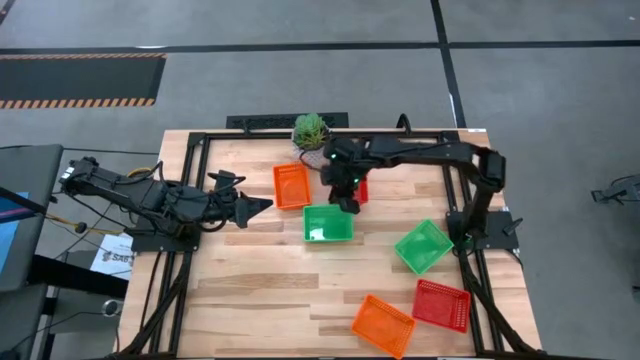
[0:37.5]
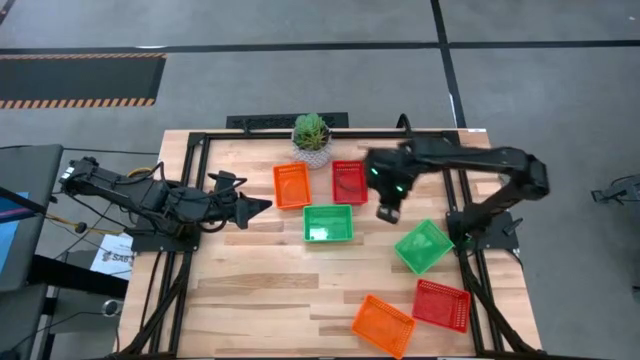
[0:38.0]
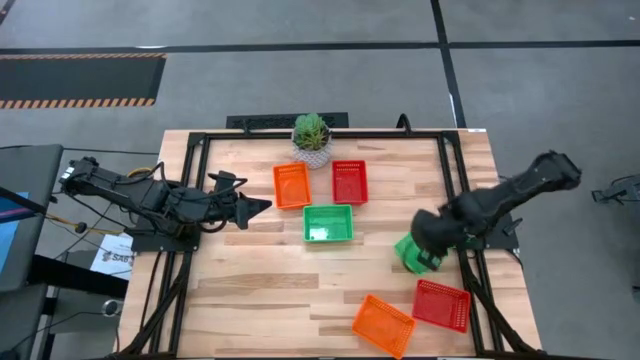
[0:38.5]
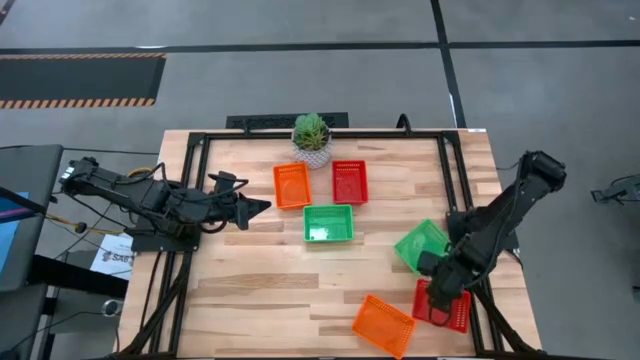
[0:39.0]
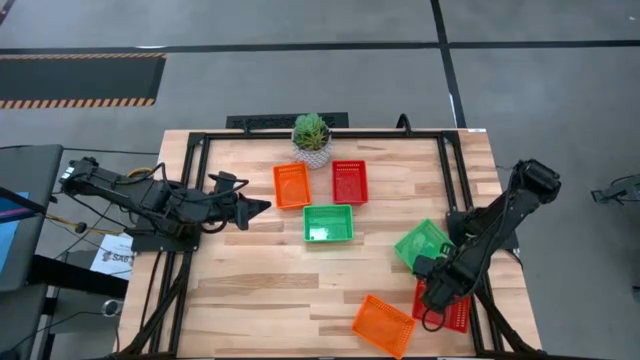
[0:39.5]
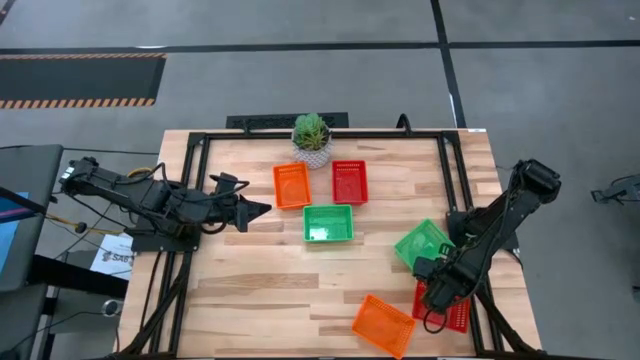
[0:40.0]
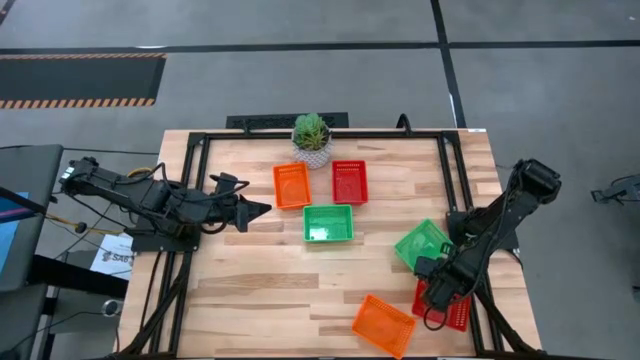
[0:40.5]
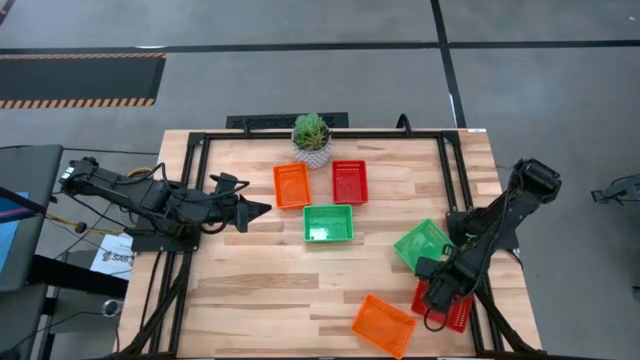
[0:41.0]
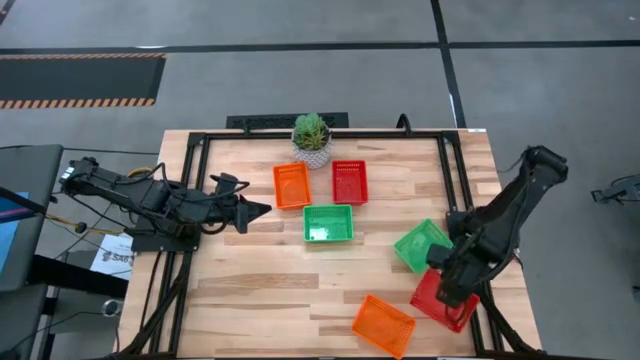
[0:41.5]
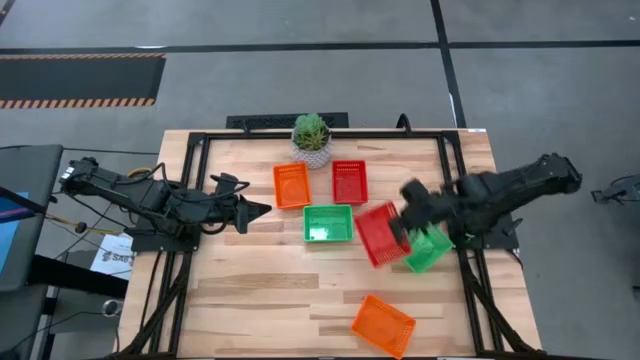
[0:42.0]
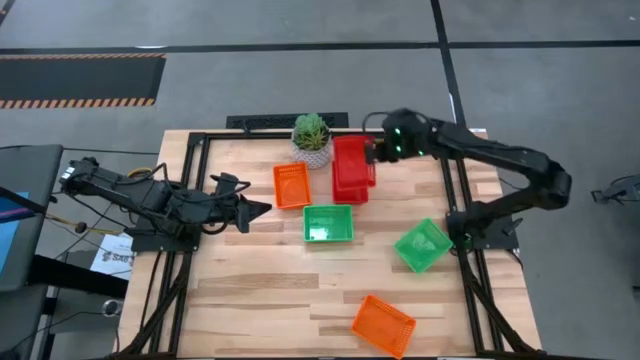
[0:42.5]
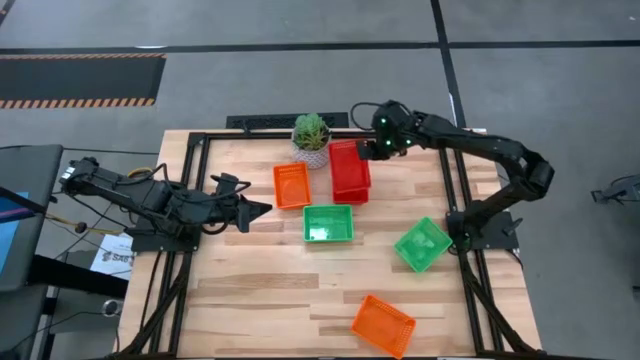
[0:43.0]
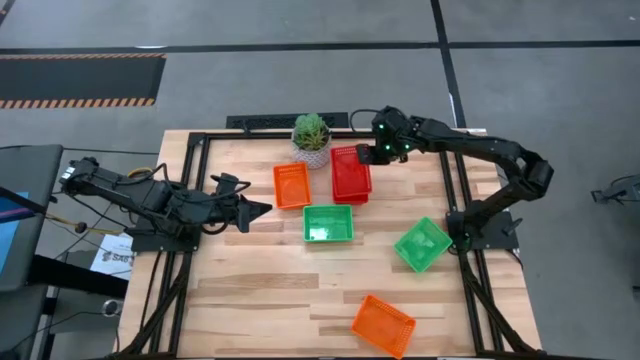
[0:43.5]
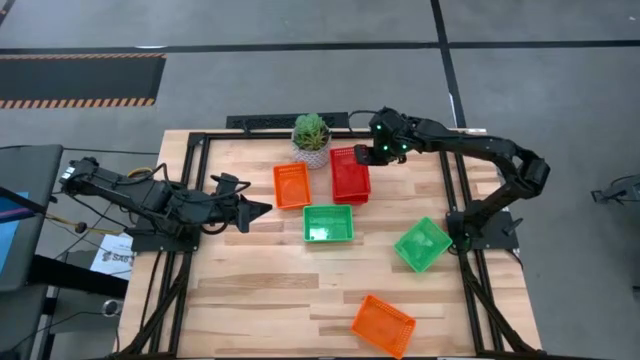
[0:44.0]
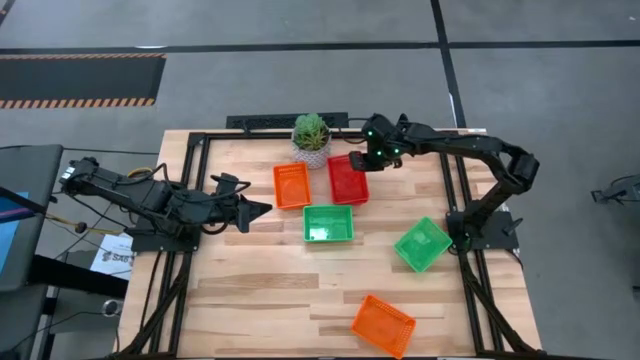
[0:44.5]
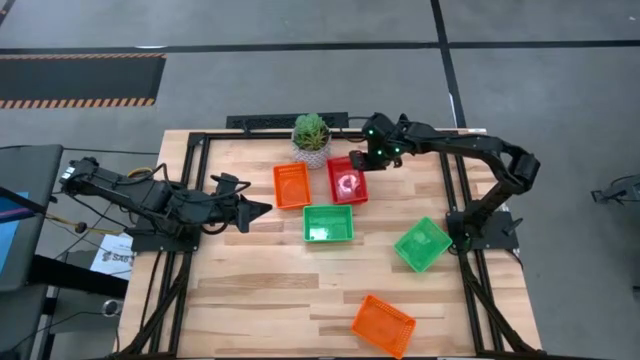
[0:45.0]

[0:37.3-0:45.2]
Stack the bottom red bin on the top red bins

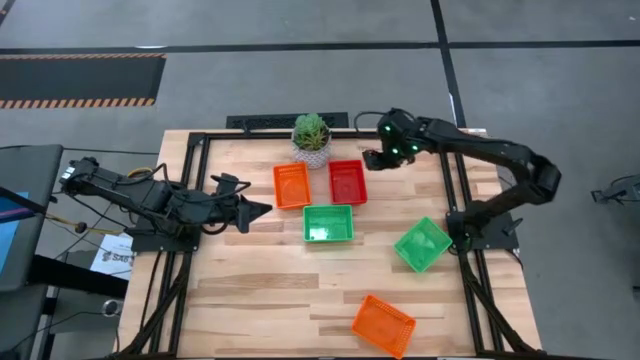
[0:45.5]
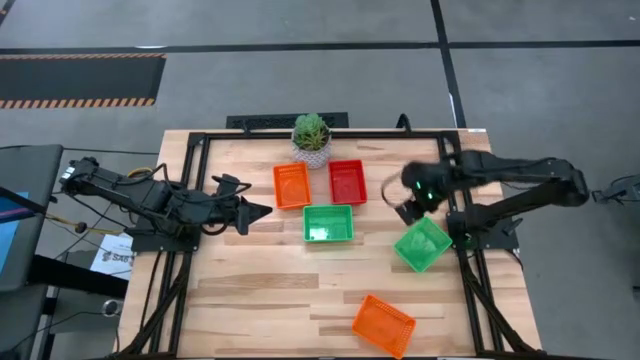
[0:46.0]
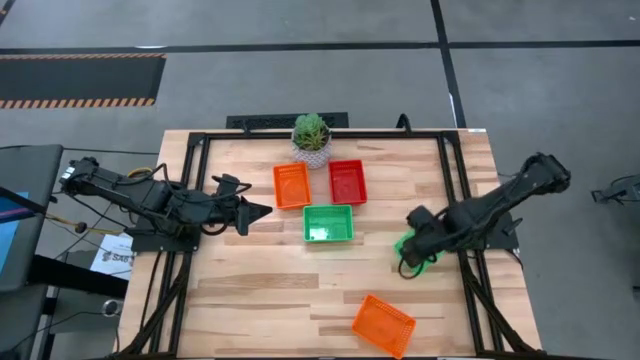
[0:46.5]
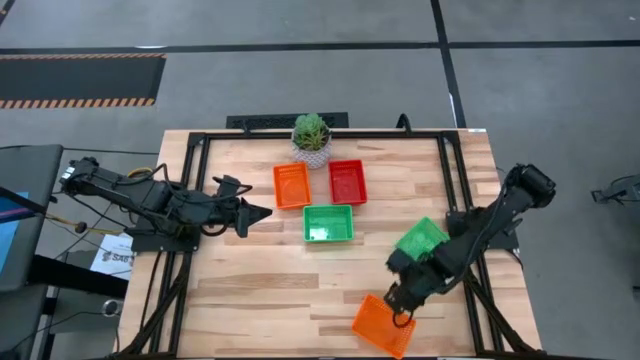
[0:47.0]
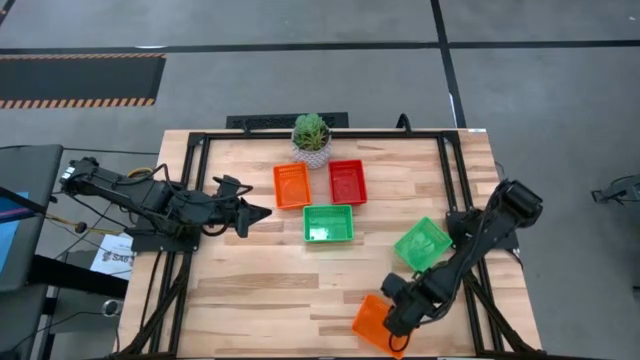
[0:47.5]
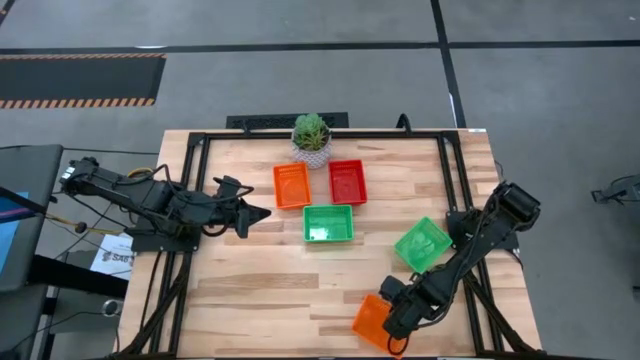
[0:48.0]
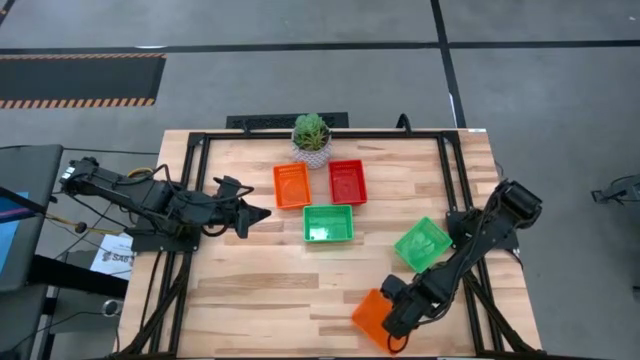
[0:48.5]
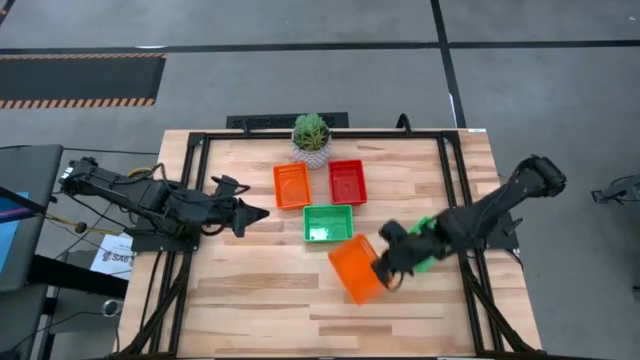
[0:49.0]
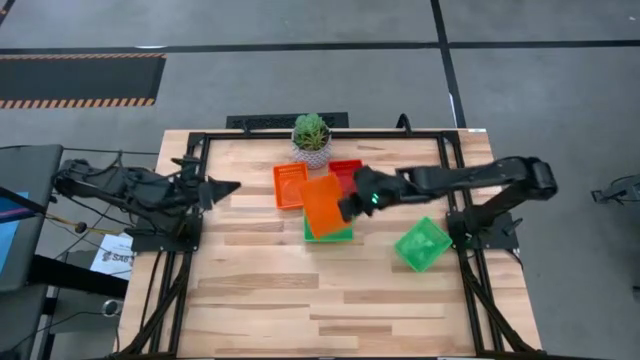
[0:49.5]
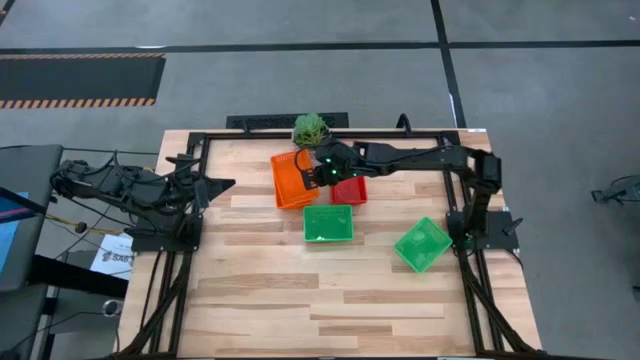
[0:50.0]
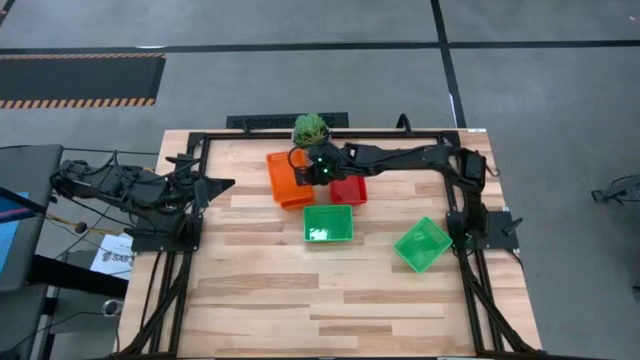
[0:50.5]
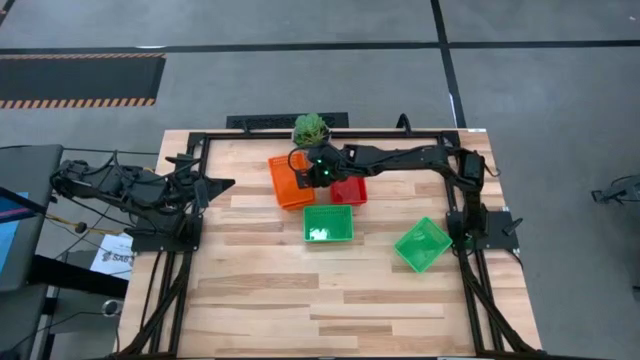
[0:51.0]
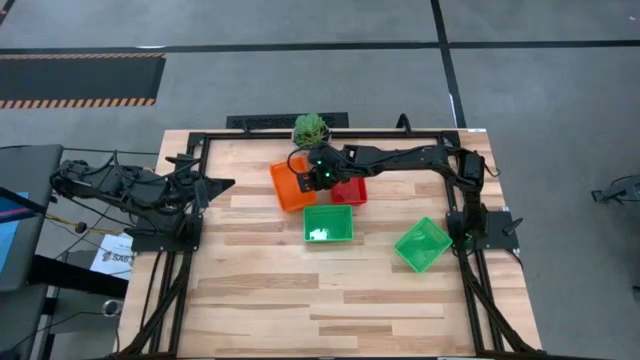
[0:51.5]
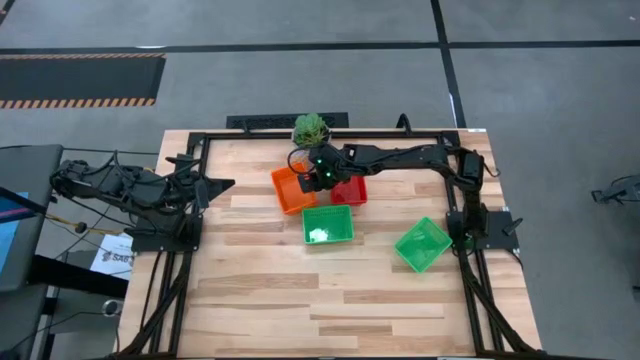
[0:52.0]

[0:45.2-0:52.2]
Stack the bottom orange bin on the top orange bins

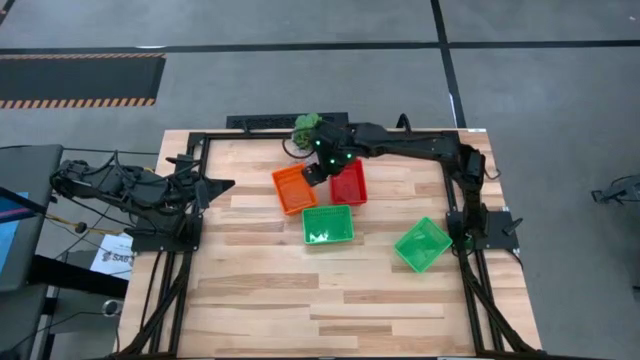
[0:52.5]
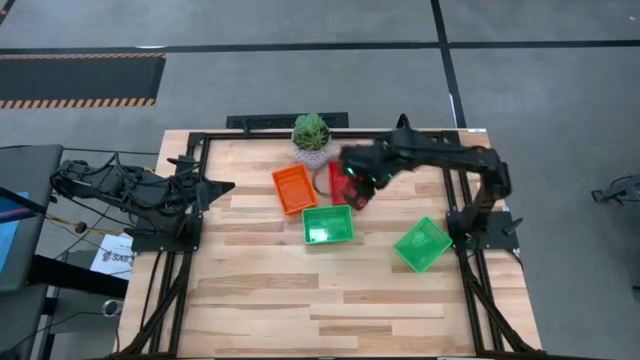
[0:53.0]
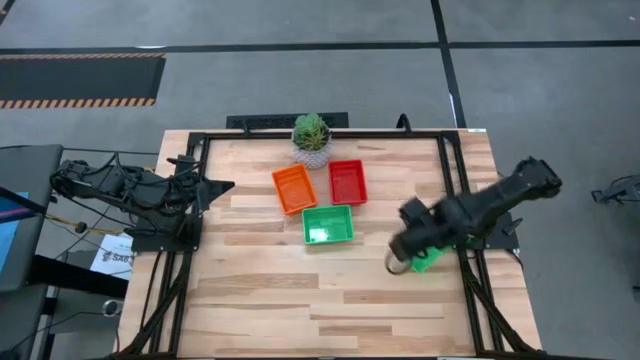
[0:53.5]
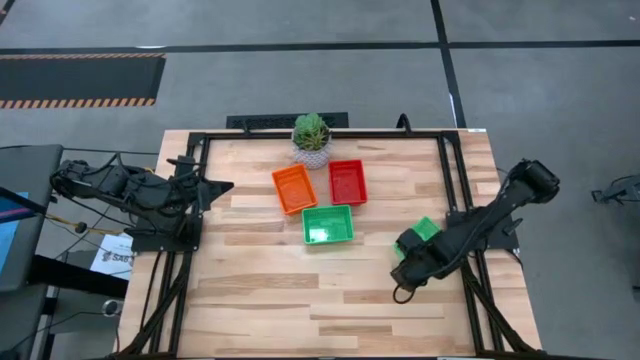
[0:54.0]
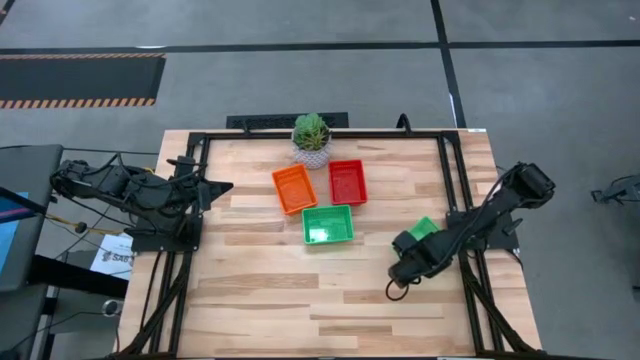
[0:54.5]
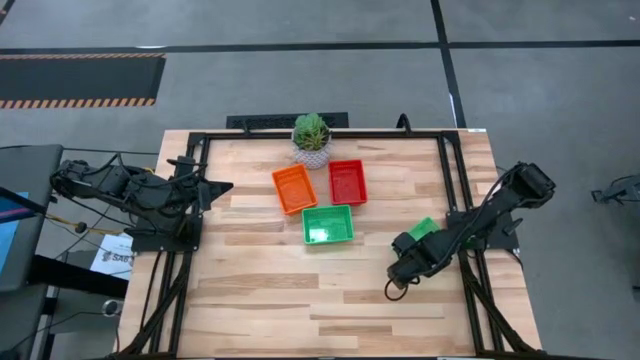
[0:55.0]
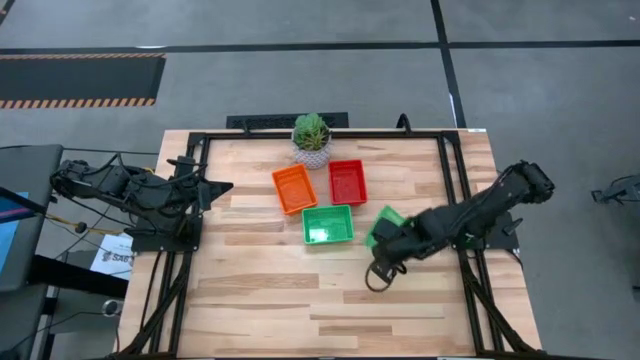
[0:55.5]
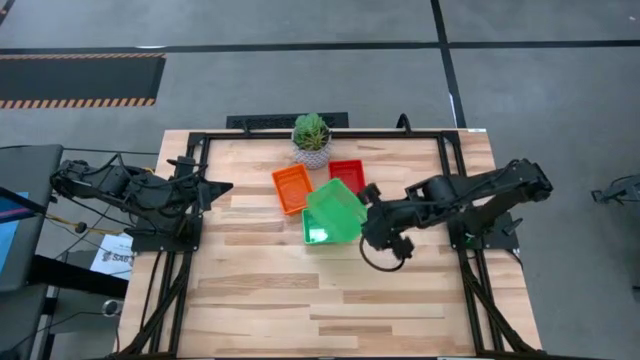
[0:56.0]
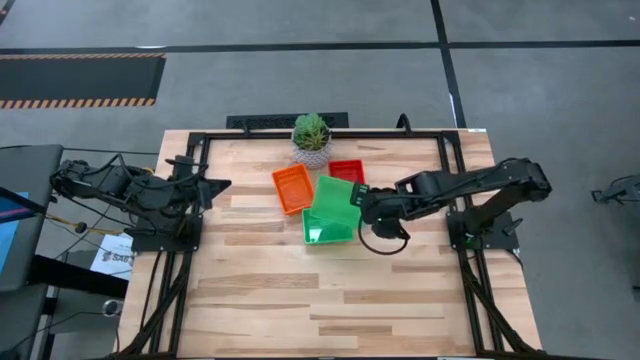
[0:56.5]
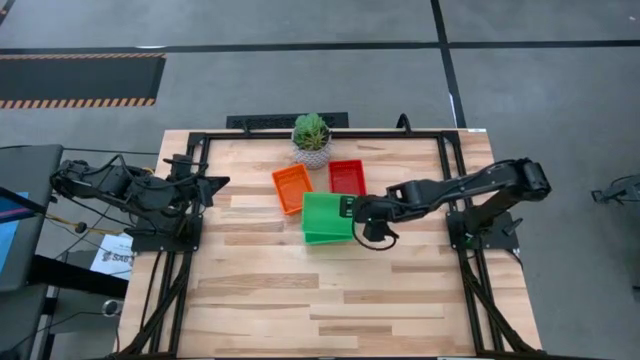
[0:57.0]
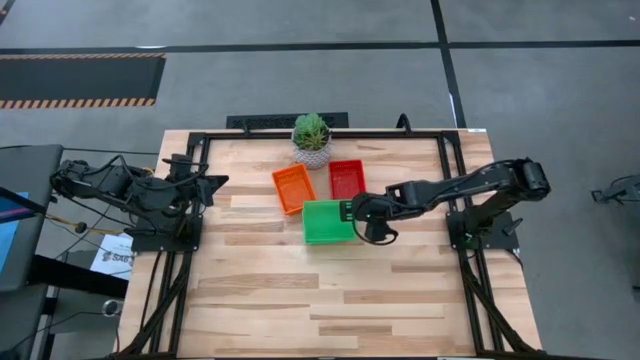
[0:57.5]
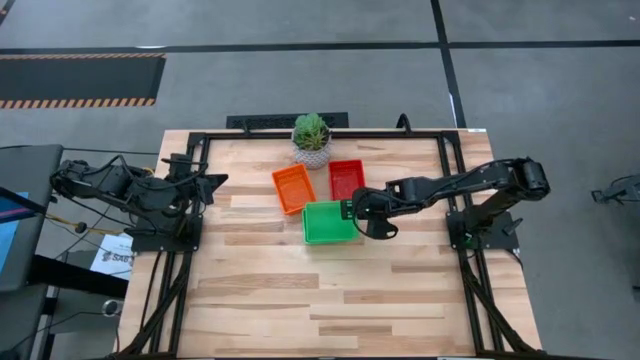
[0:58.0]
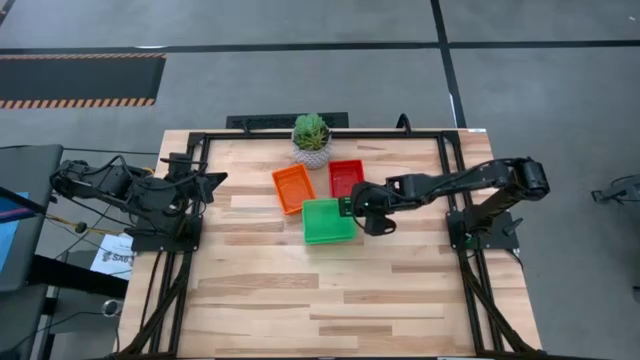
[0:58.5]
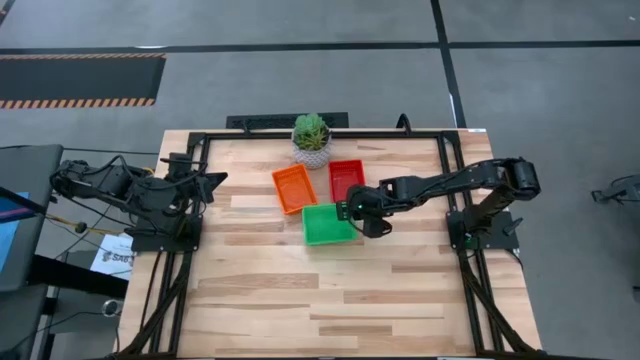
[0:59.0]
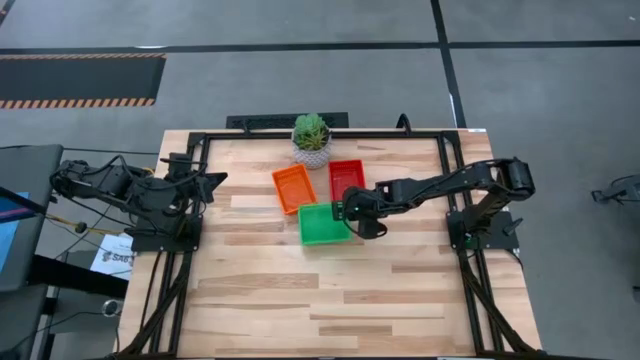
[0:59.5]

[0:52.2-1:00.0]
Stack the right green bin on the left green bins
